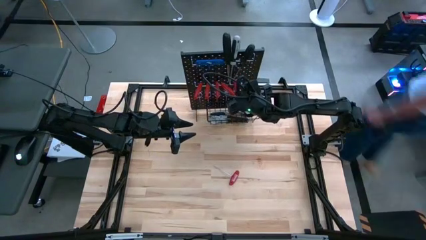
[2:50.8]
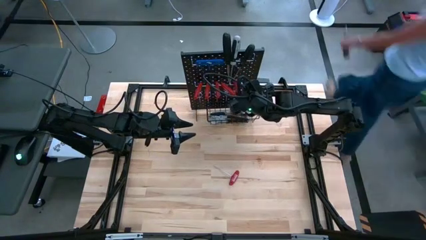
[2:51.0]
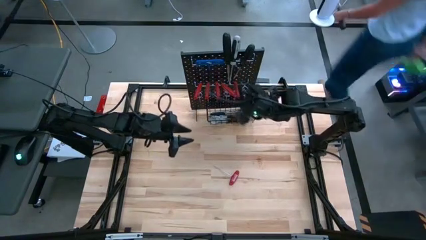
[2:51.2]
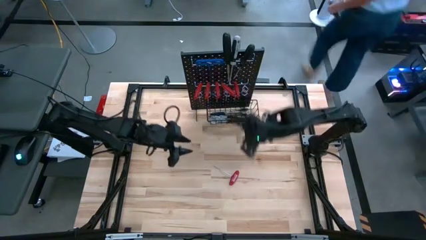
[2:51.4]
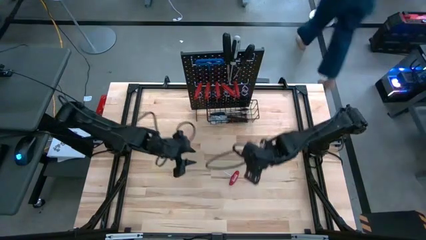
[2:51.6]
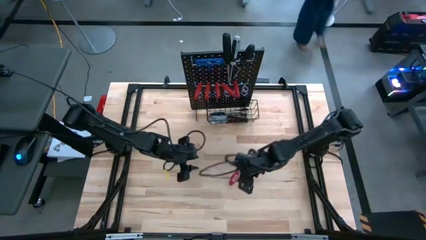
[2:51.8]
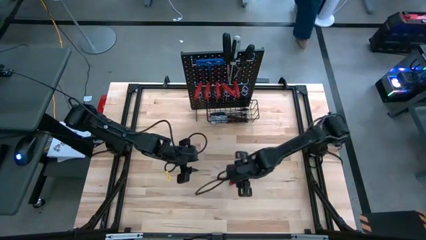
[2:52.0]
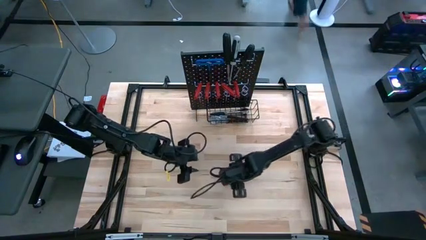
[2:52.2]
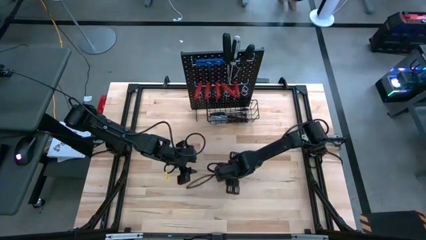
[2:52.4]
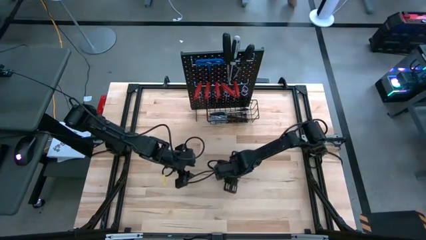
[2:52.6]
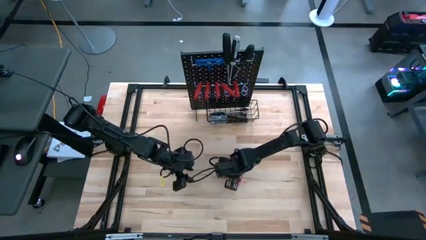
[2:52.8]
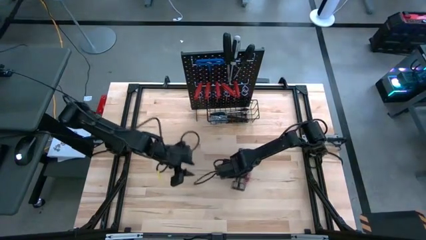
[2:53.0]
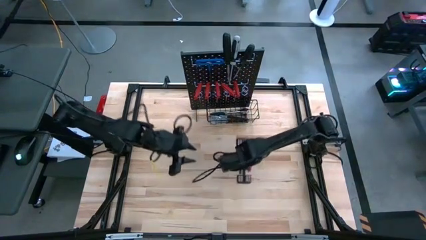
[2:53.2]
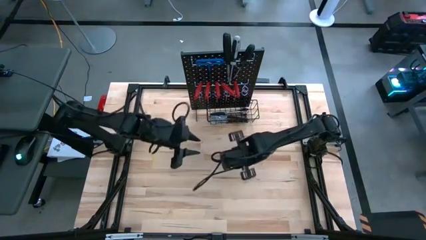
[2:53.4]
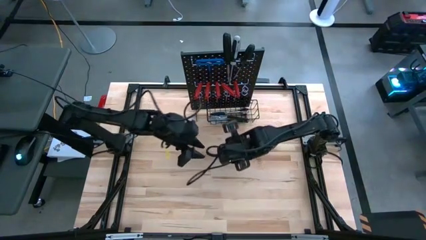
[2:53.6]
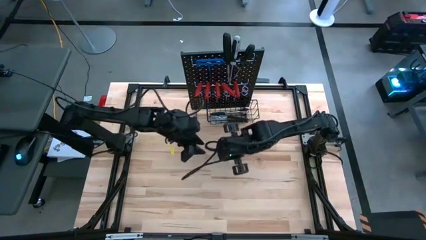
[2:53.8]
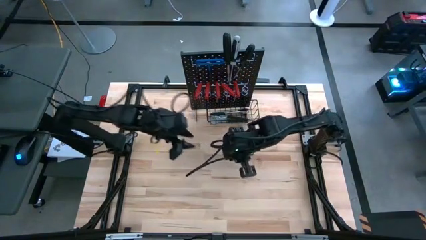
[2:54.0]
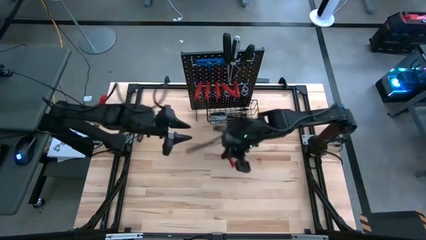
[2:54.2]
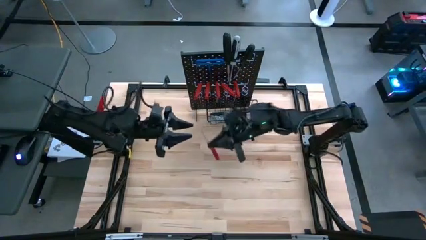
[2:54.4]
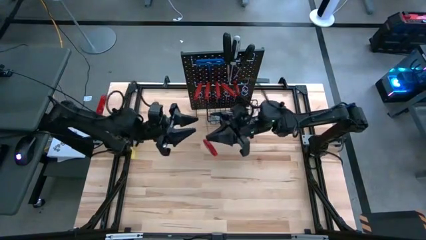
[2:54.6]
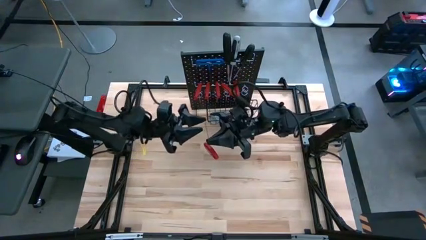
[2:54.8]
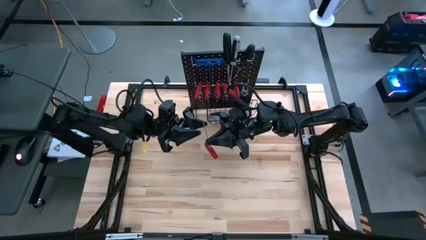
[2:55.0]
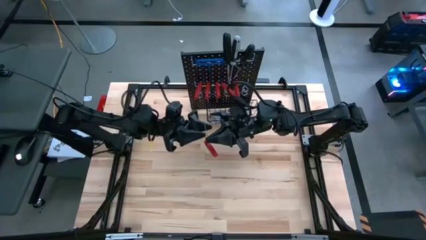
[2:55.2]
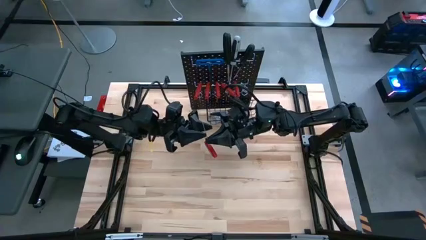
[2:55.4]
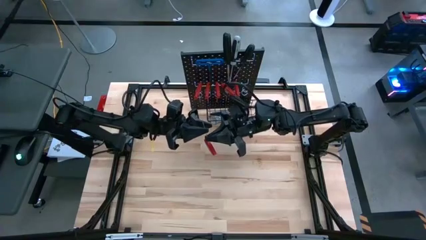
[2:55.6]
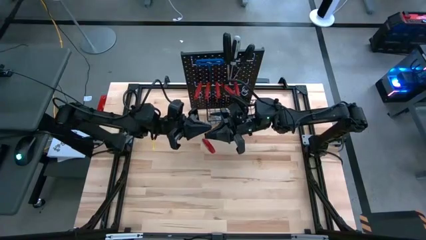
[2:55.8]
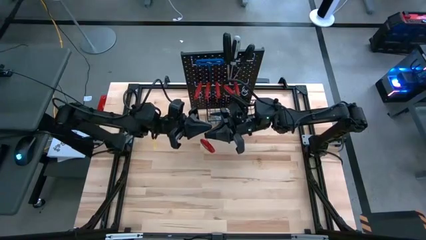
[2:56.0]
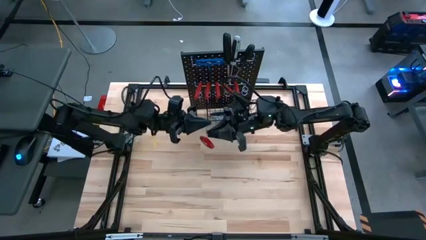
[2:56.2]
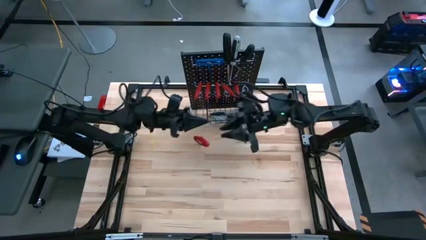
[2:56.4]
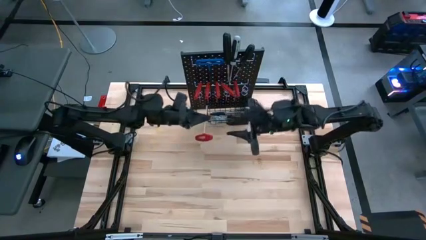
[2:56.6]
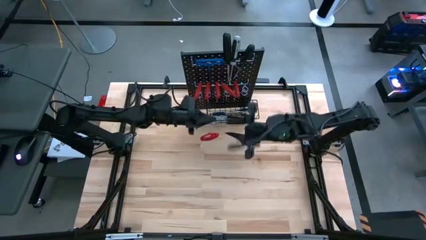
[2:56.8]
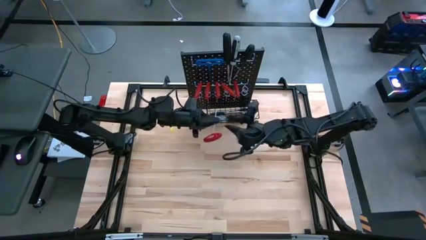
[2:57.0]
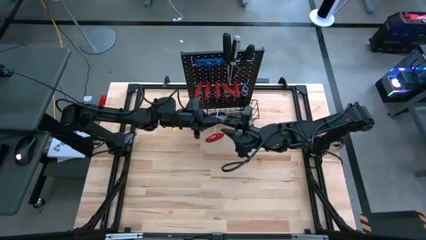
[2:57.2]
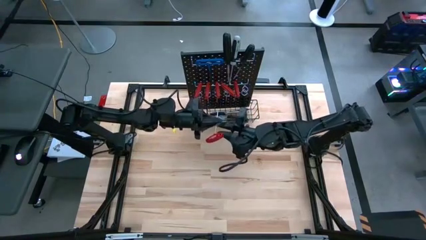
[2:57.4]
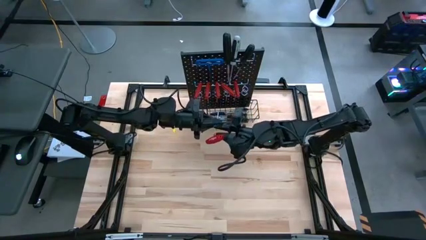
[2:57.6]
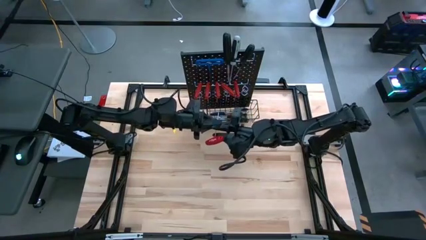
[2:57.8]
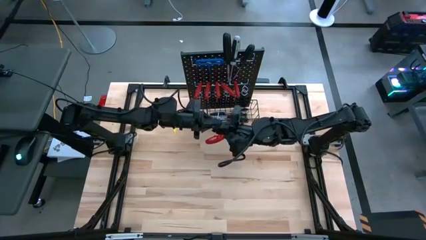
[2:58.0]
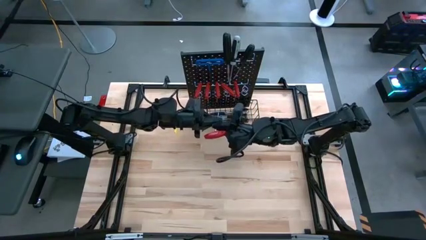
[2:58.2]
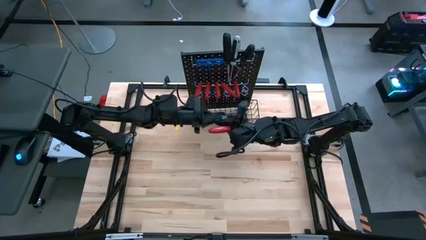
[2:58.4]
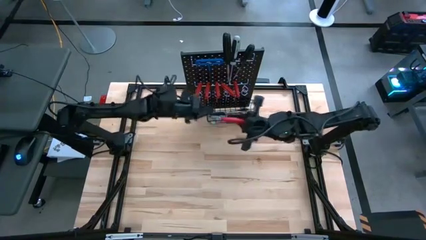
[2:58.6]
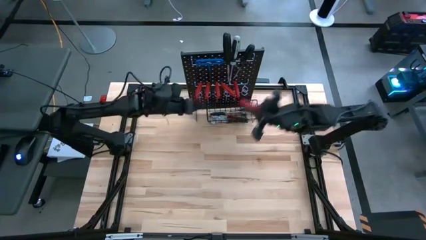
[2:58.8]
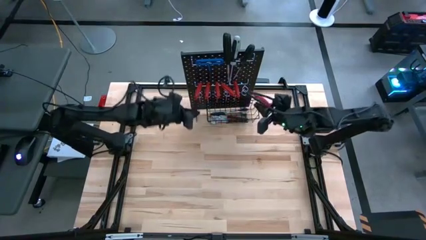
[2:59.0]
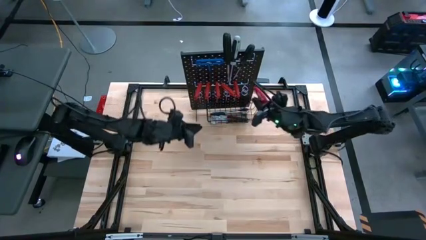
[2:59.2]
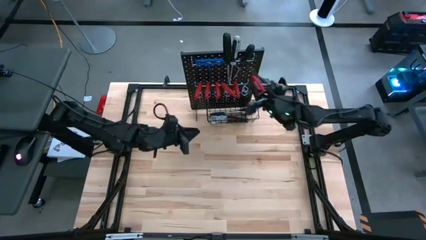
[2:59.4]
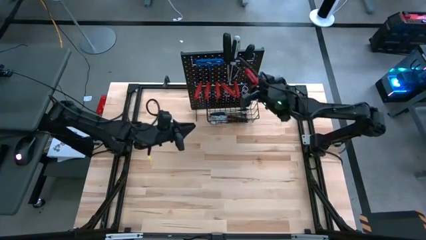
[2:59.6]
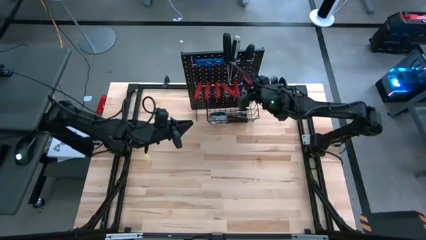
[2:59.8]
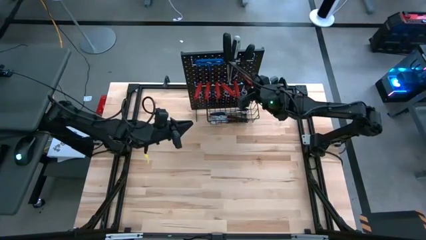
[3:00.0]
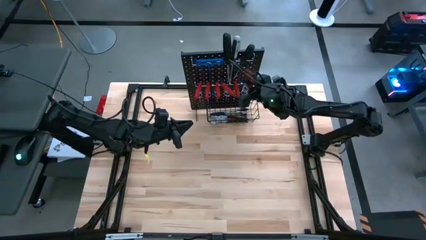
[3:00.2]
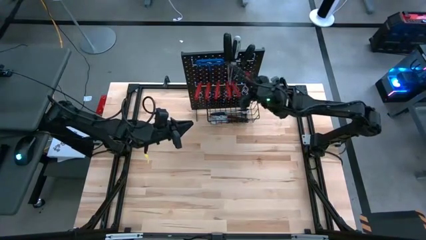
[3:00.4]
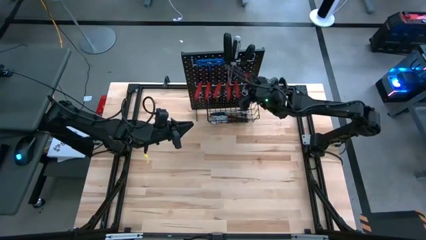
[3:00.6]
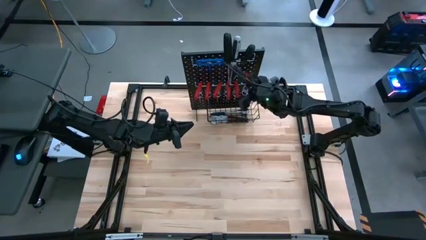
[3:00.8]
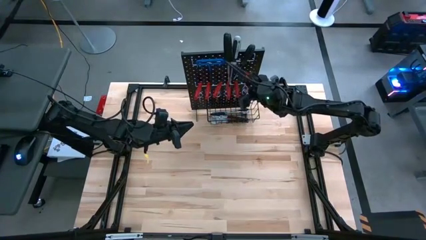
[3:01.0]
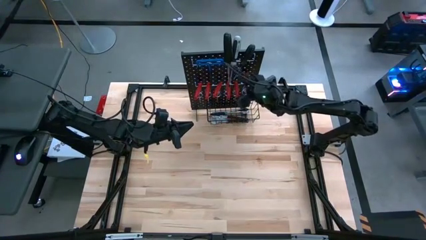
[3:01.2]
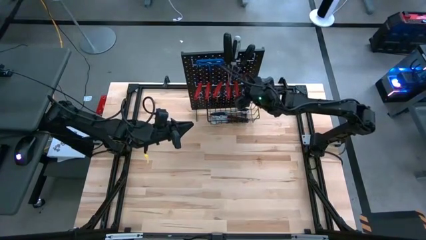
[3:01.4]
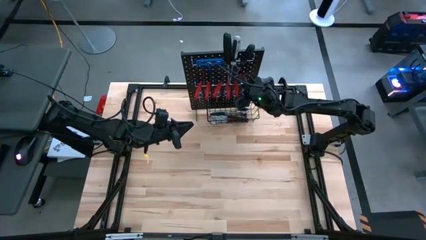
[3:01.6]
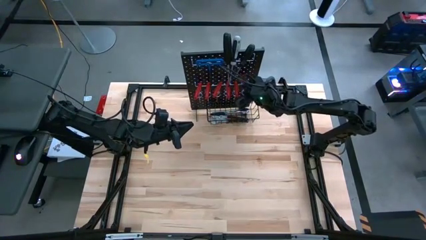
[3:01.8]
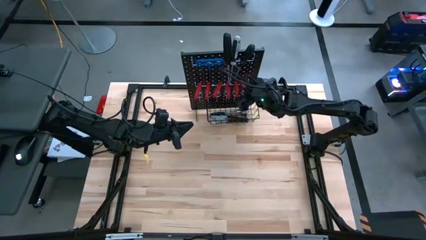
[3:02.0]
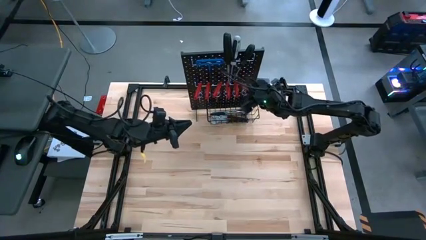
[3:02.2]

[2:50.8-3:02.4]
Task: Hang tools onto peg board
Hang the red allen wrench on the pegboard
